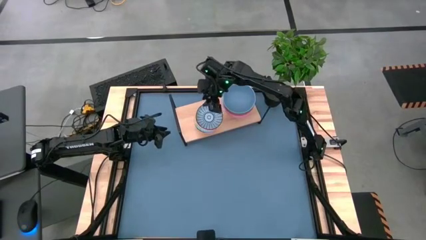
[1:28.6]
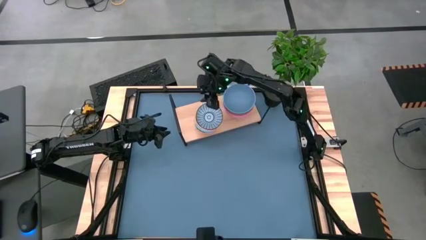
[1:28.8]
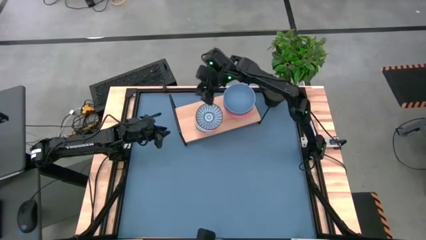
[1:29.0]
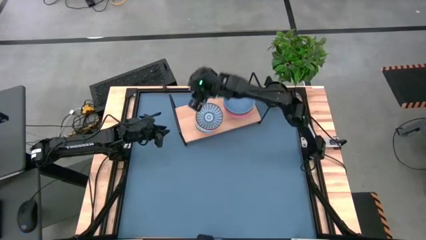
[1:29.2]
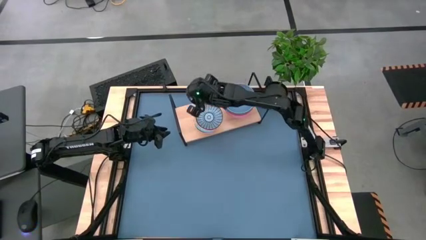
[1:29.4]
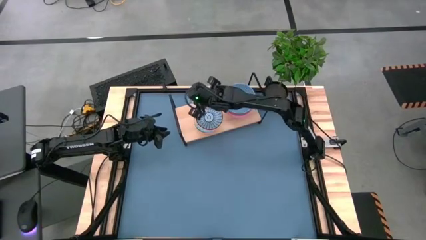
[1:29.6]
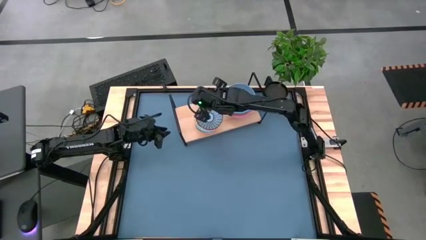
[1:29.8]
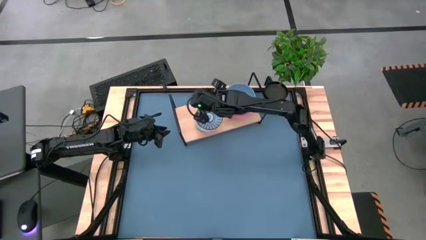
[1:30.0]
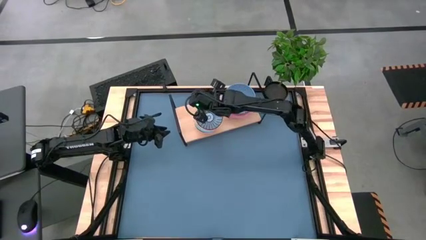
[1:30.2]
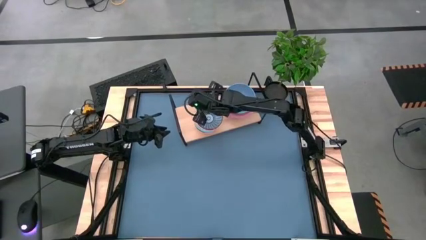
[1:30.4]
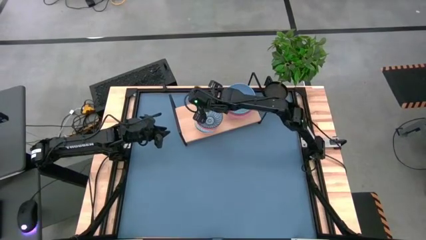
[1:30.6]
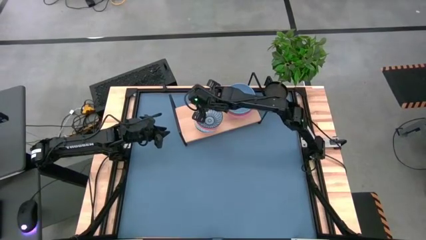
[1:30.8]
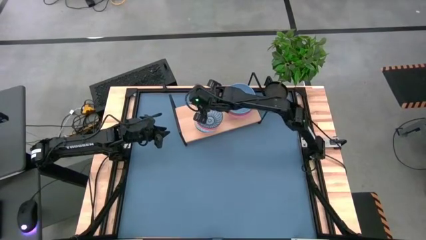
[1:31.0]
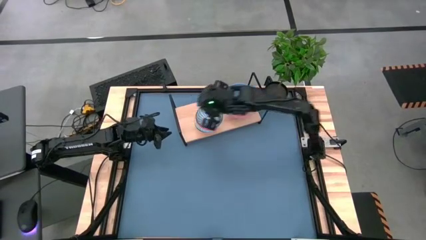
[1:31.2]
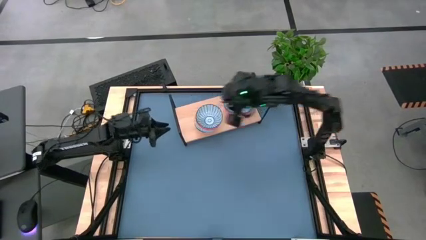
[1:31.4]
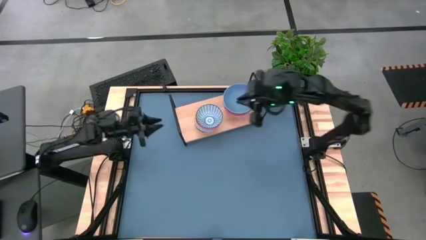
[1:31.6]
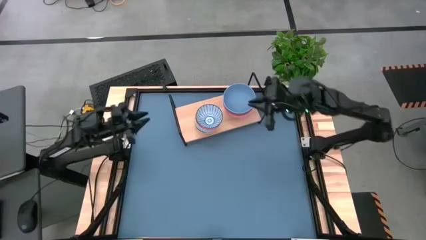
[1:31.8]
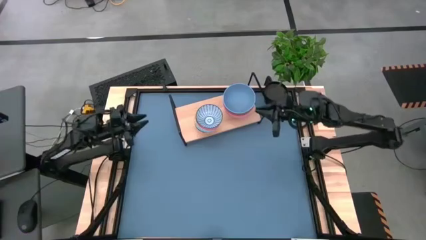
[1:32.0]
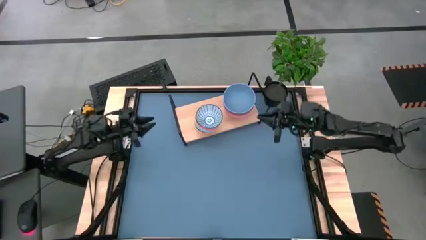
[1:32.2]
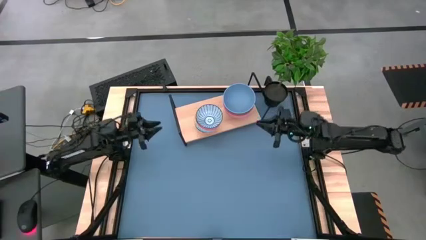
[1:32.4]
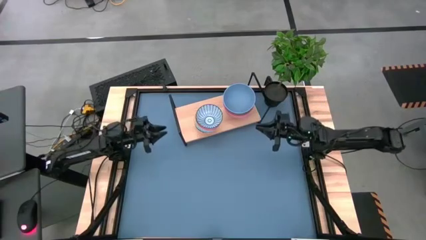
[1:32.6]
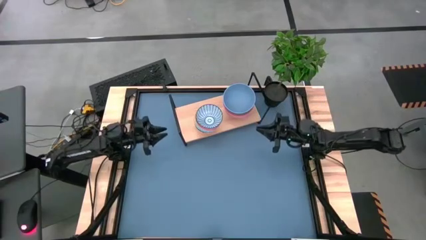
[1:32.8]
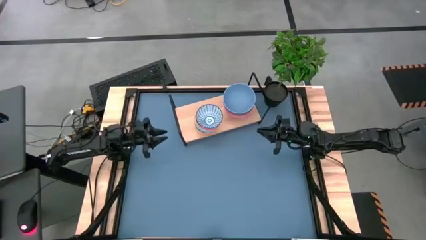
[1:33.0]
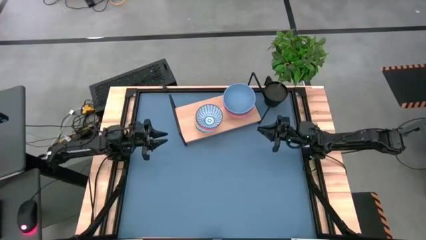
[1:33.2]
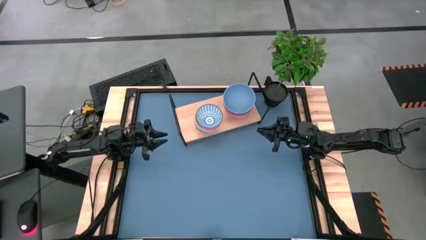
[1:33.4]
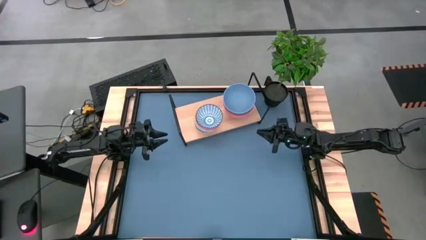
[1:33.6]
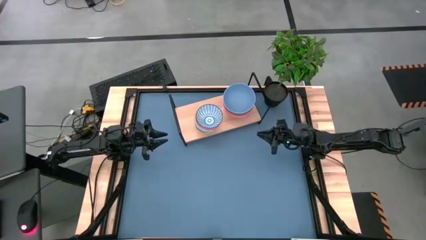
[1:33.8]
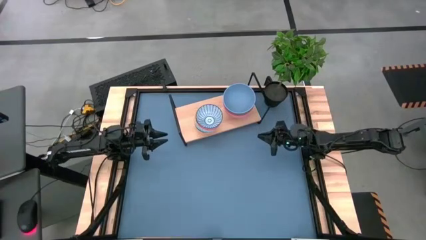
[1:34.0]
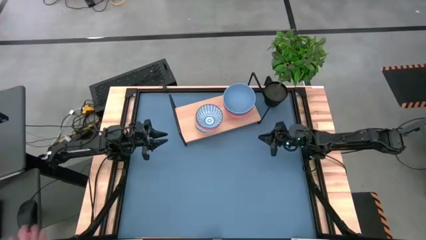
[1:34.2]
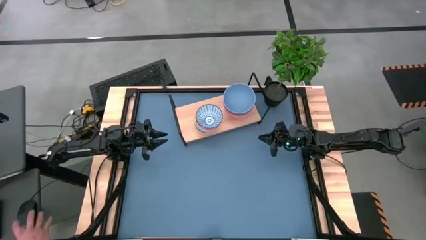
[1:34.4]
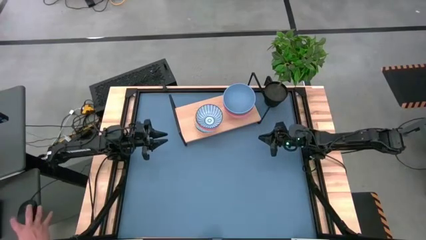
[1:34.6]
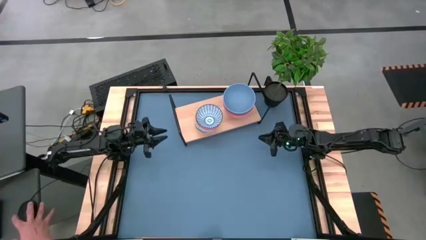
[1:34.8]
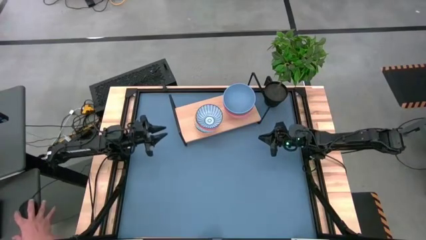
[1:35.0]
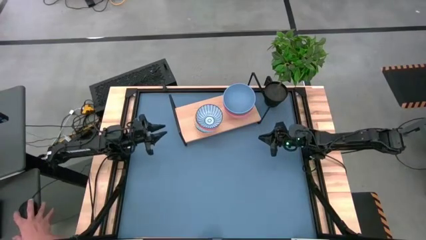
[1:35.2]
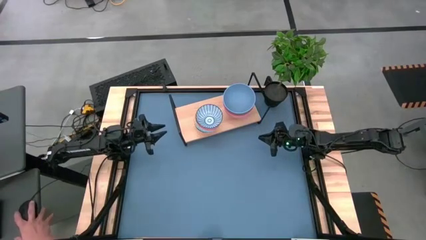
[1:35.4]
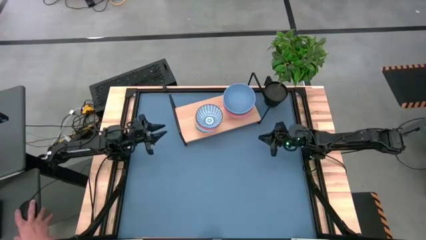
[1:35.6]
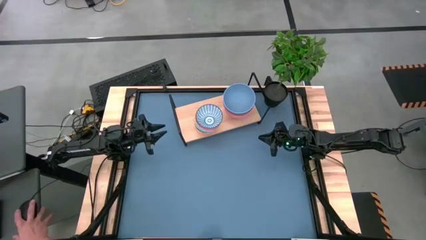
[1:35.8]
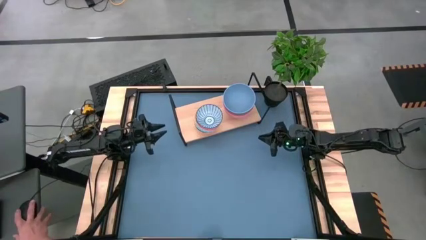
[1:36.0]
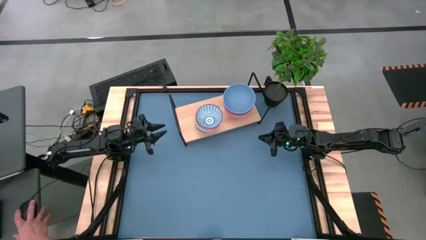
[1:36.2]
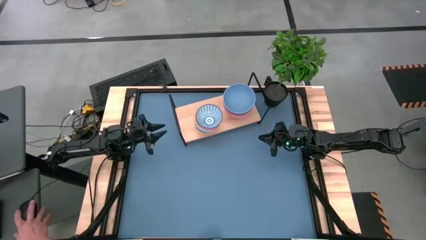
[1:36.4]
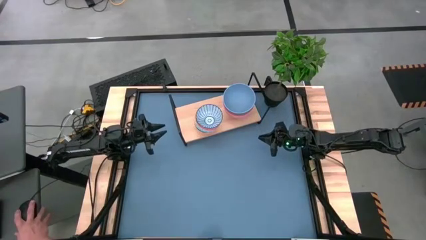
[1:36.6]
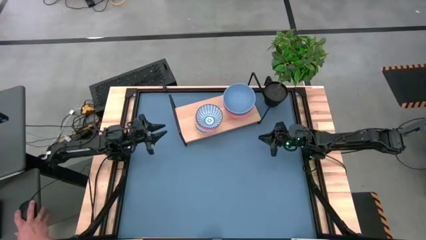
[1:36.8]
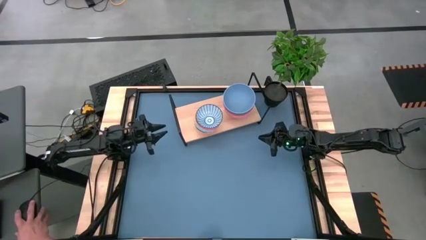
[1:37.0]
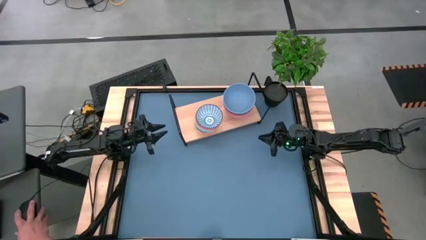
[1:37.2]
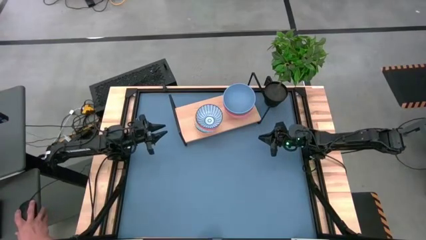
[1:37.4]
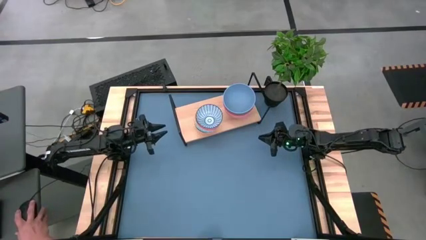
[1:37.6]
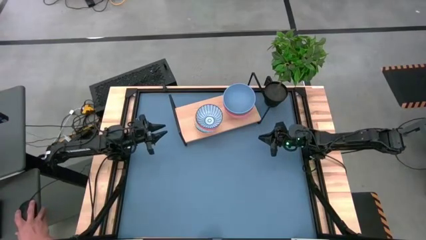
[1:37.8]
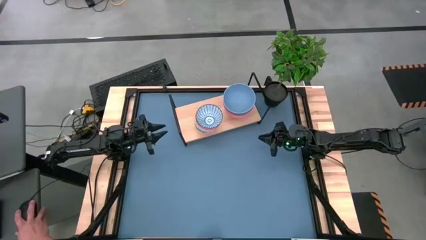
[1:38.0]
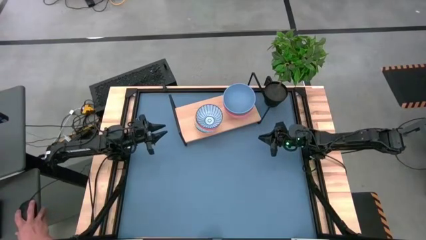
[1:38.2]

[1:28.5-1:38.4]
Task: Place and stack bowls onto a shelf
Return to Home Position

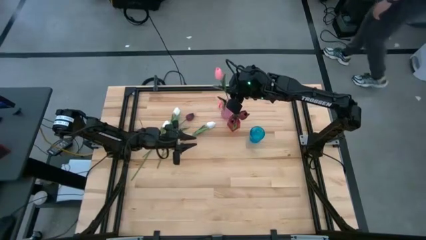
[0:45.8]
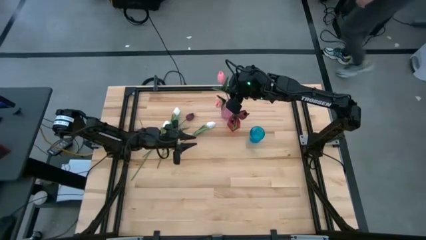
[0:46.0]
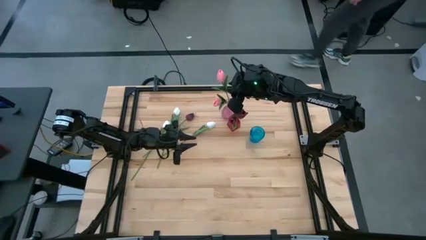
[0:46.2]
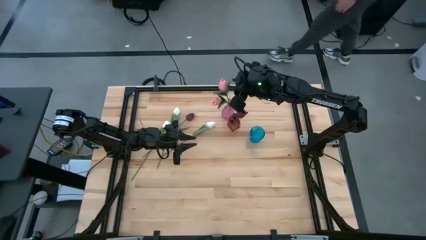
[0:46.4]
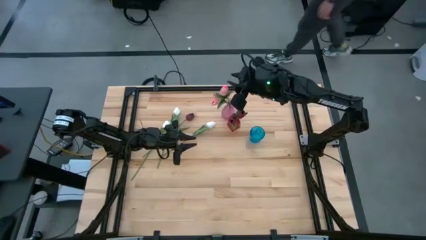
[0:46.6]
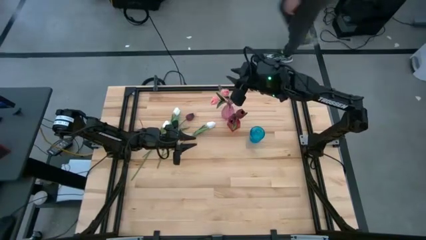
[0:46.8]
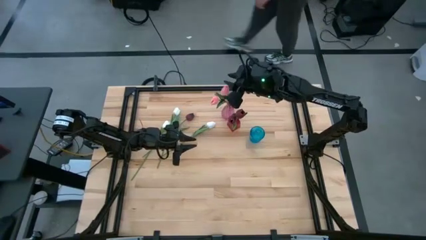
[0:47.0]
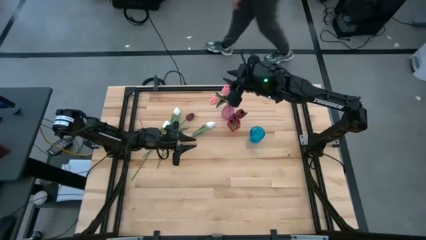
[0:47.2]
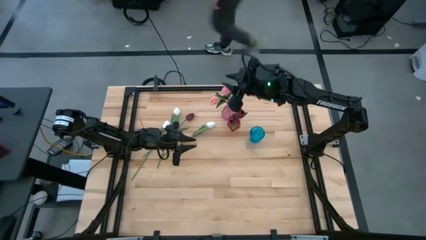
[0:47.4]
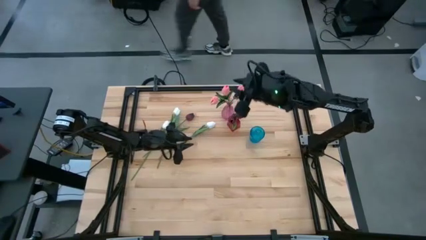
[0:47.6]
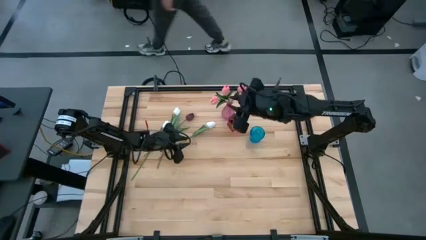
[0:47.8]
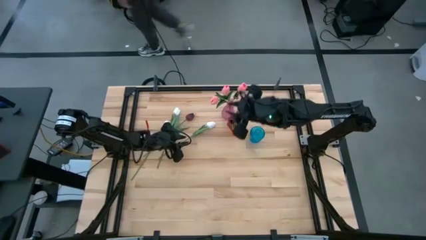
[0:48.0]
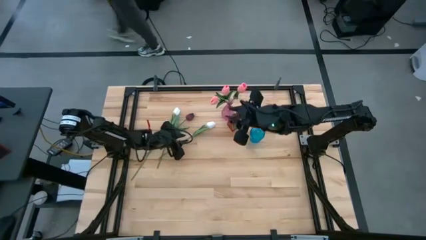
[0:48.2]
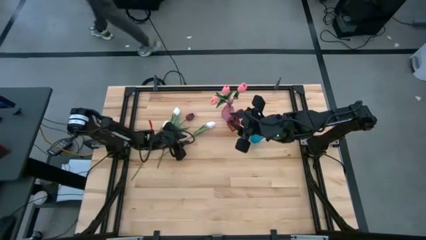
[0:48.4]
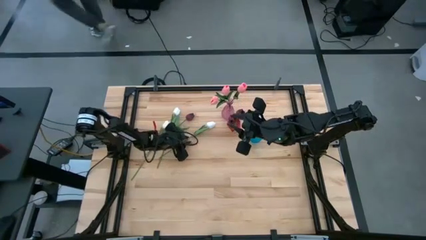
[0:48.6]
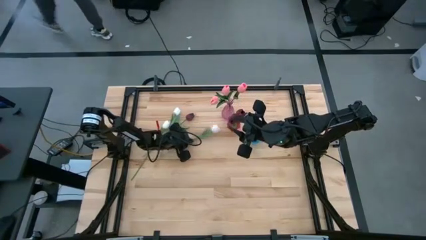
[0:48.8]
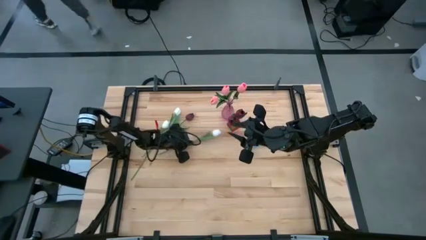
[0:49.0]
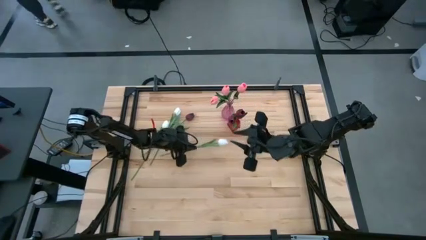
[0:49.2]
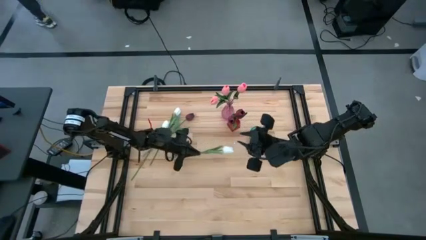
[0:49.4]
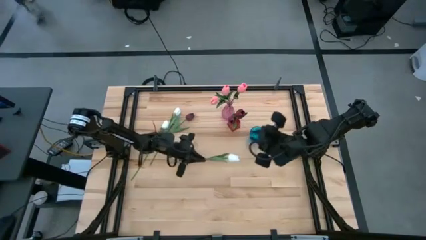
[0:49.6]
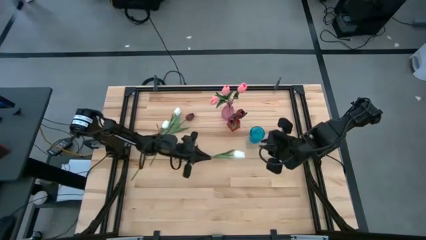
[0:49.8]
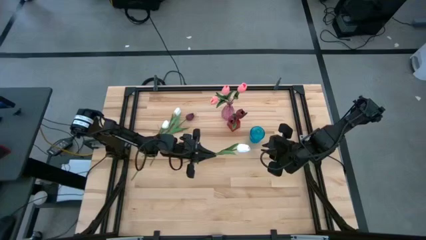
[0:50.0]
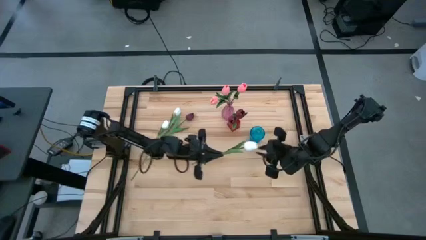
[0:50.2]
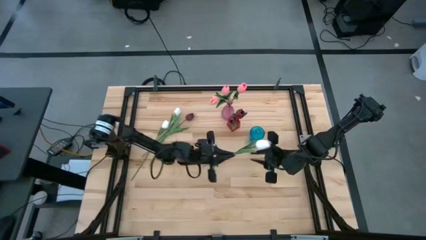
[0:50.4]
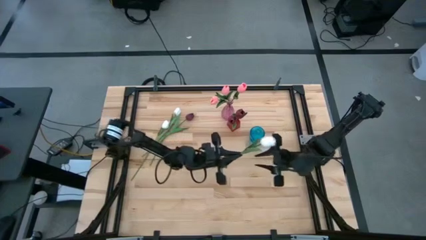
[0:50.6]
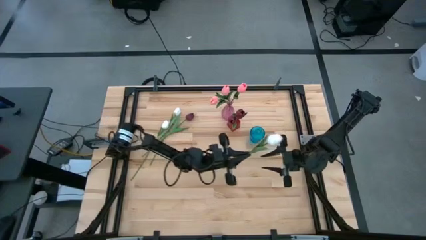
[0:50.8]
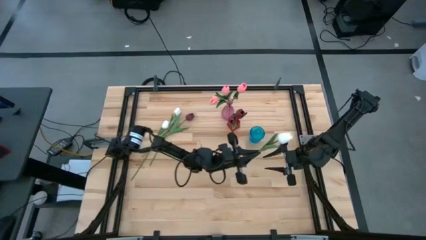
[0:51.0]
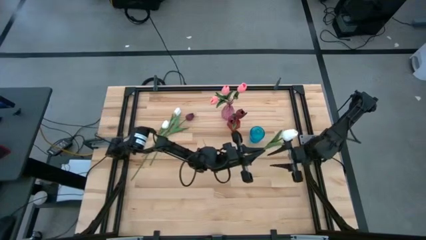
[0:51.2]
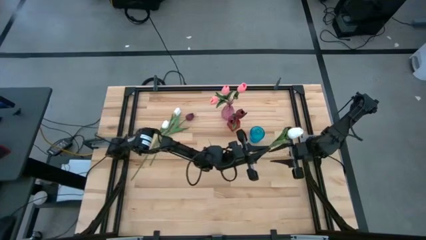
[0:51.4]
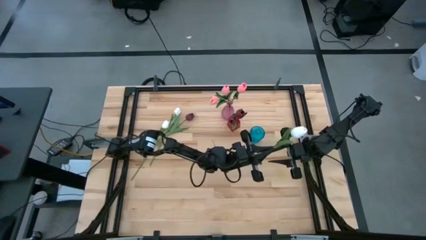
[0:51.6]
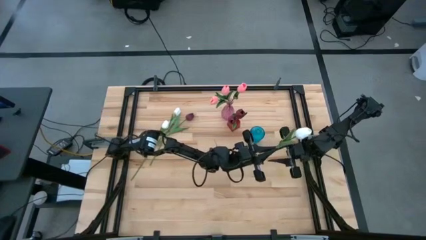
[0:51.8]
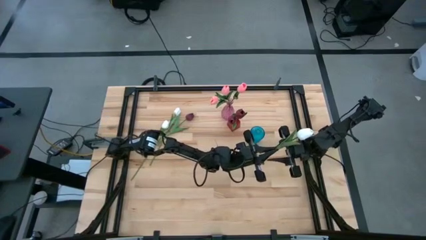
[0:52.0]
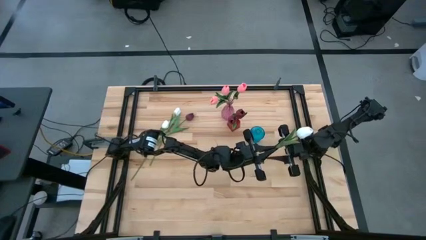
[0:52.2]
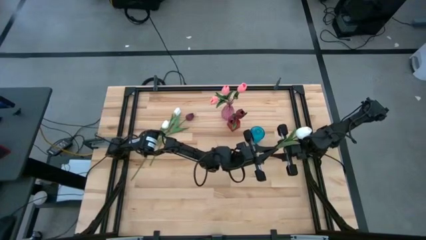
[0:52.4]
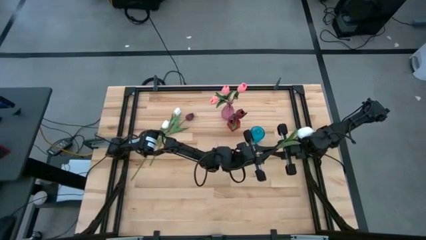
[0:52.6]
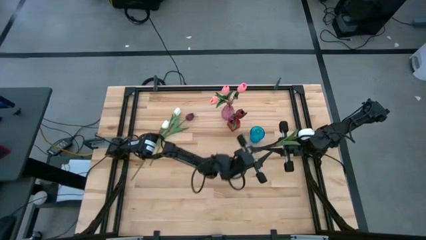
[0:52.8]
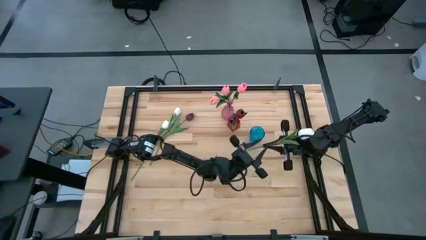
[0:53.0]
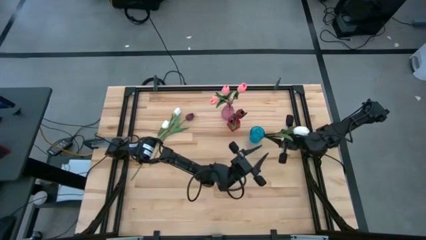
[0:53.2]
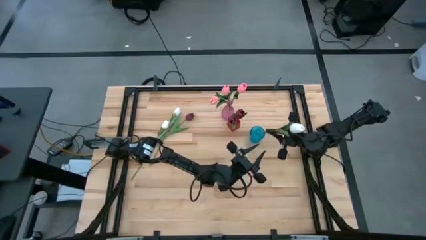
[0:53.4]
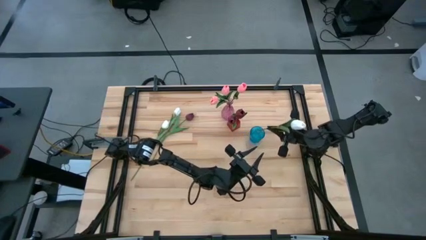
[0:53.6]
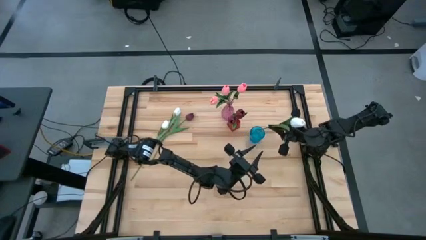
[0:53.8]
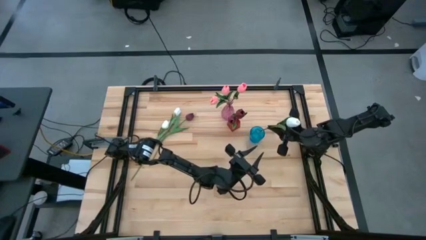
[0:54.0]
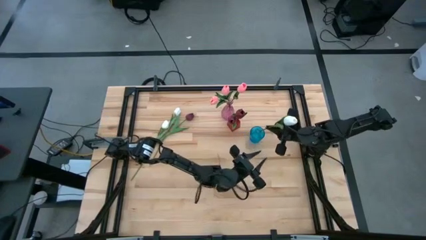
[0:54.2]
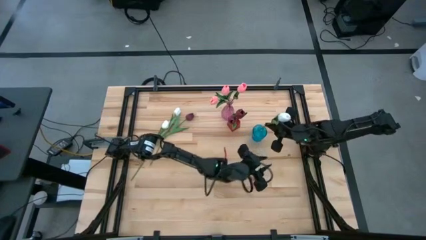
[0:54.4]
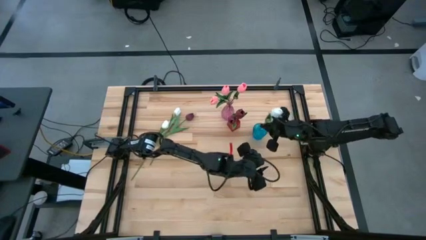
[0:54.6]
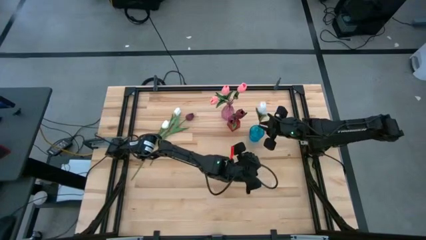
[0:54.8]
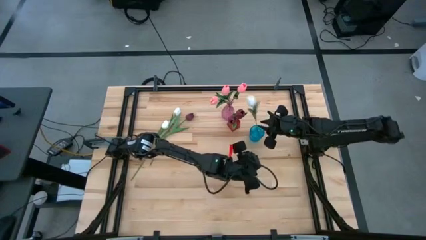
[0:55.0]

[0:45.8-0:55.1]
Task: Sort flowers into vase by color
Put the white flower into the blue vase
